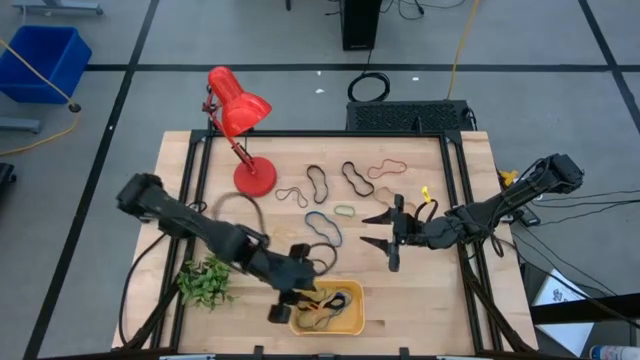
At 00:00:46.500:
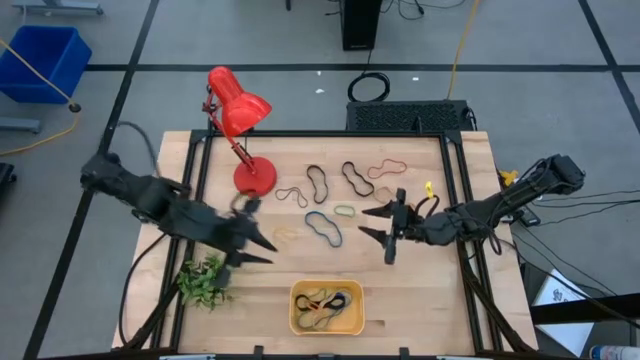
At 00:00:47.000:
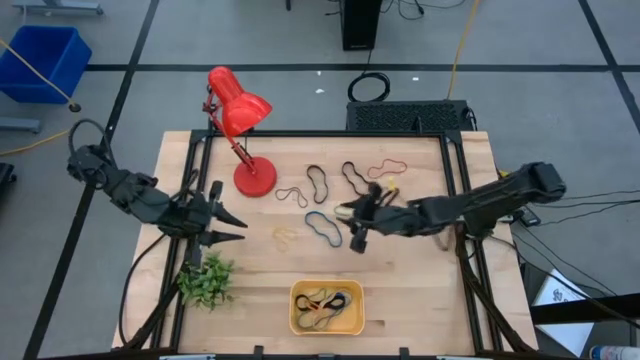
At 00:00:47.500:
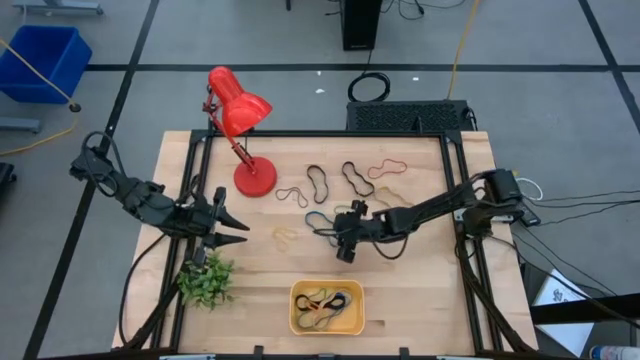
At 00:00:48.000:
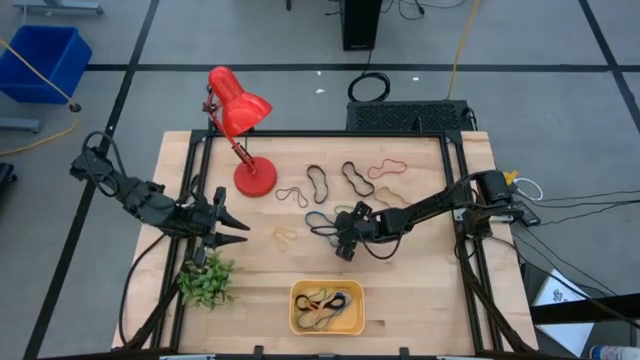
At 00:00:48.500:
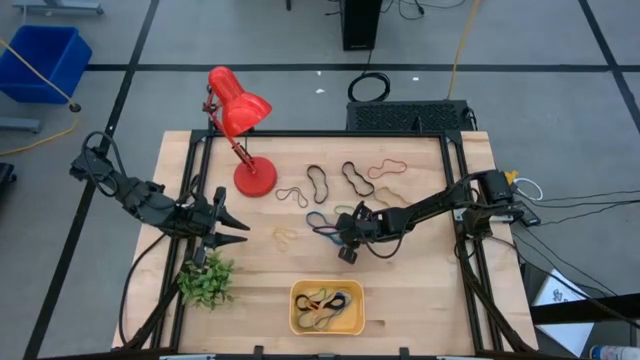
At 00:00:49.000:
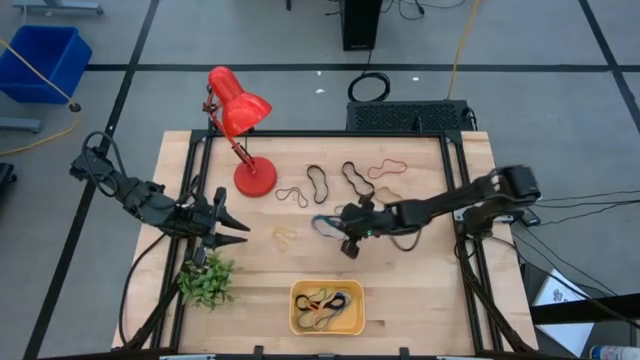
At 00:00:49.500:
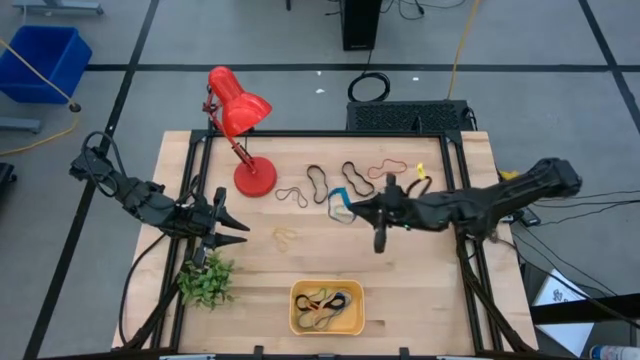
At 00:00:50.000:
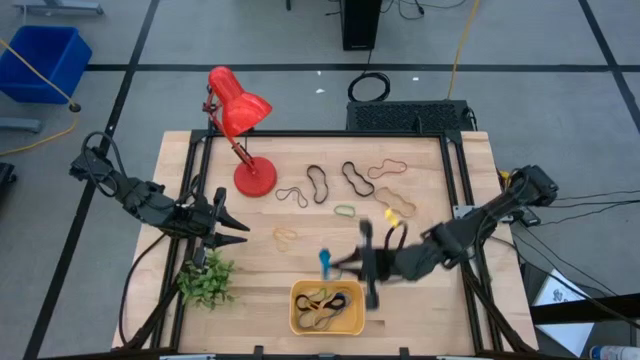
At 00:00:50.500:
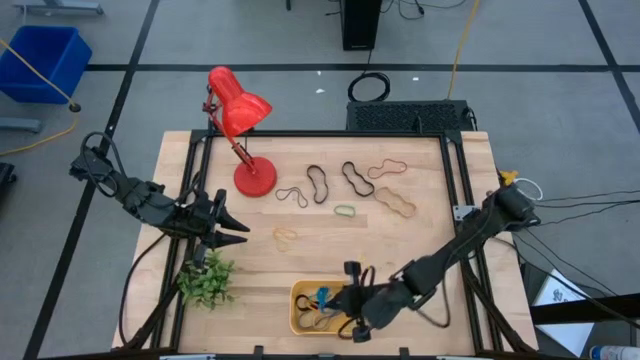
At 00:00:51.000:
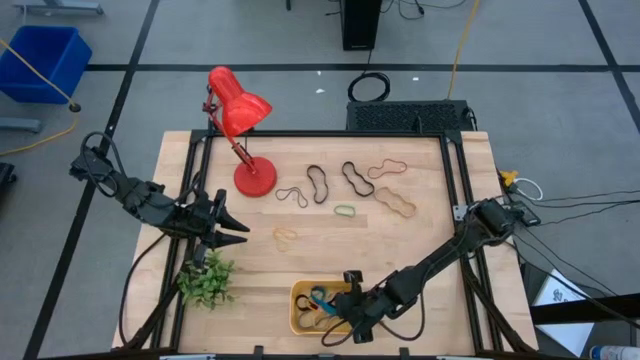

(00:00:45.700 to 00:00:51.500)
Task: Pick and place rubber bands into bin
Put the blue rubber band into the bin

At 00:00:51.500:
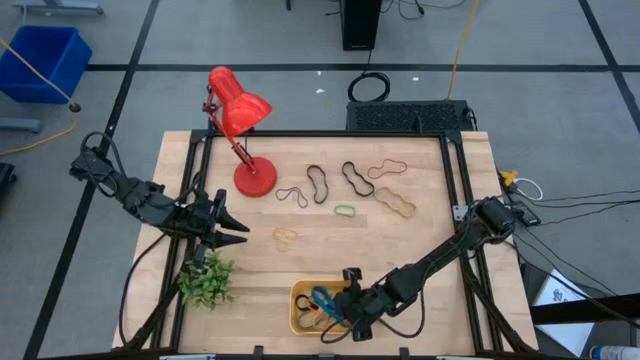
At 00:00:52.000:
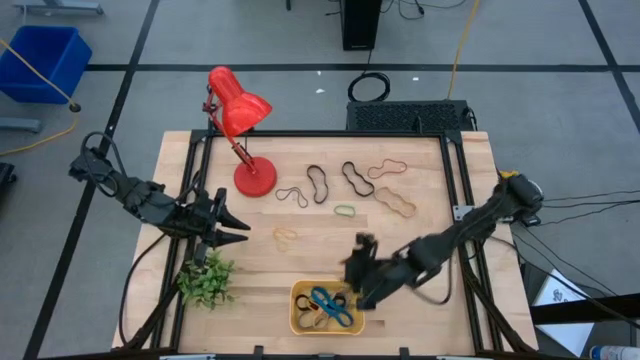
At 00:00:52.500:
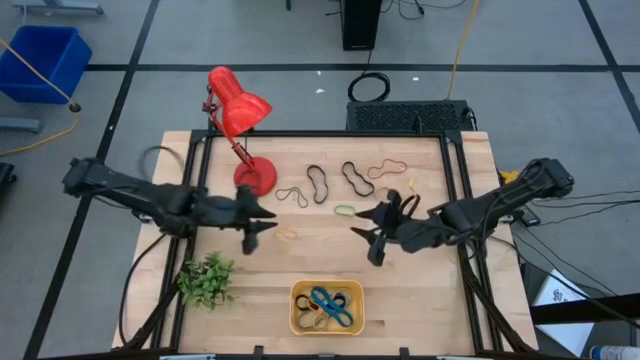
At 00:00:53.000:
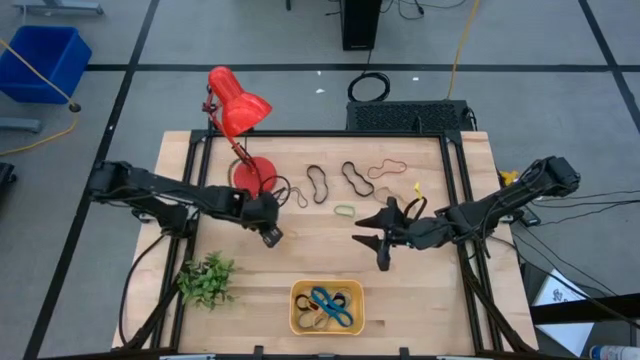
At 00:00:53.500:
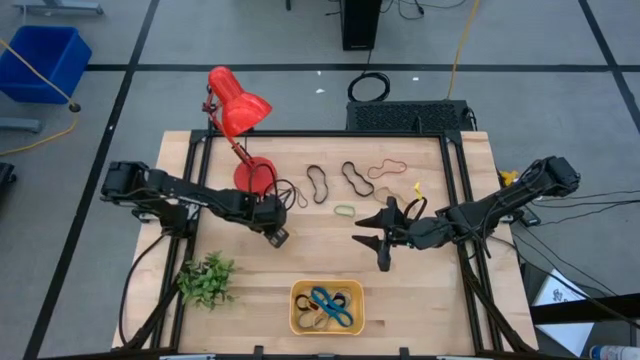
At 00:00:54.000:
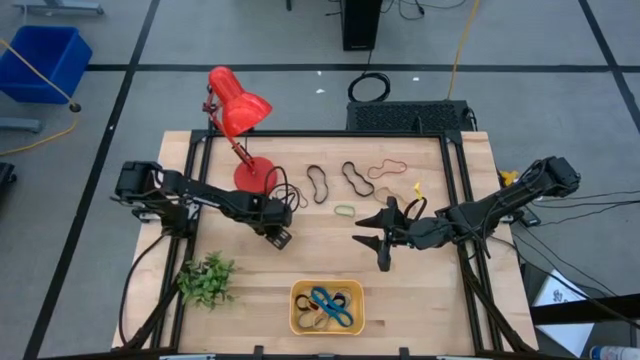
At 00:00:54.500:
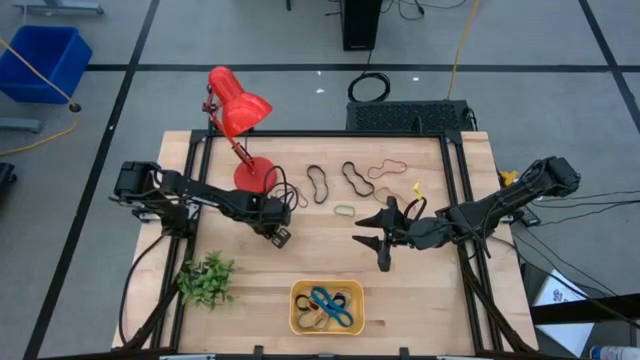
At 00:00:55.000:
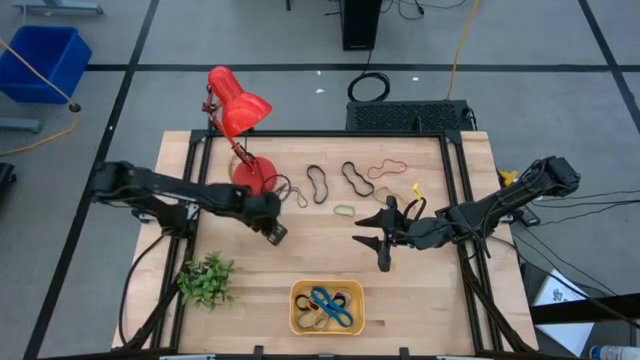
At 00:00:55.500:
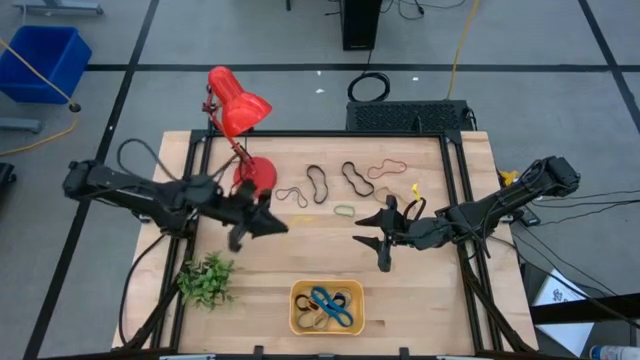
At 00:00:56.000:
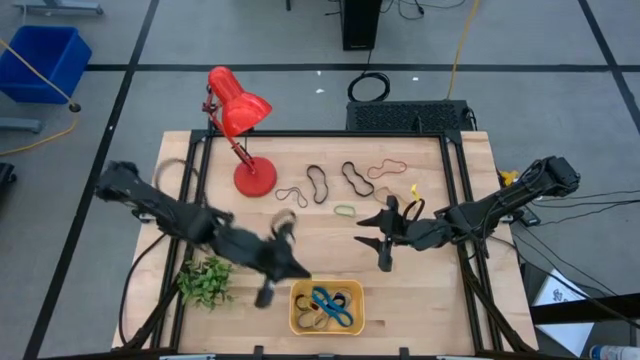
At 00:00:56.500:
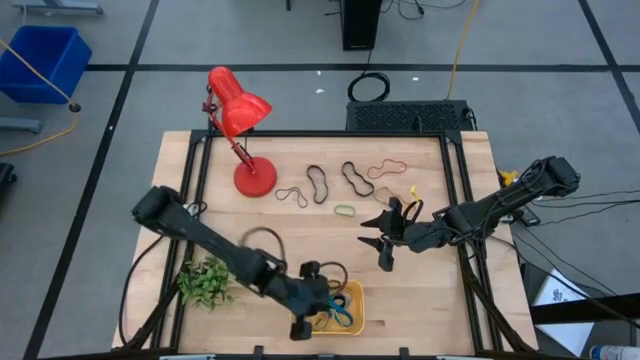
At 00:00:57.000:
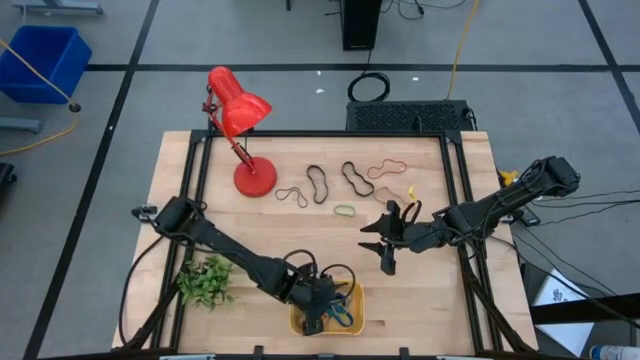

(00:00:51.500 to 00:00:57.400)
Put the yellow rubber band into the bin

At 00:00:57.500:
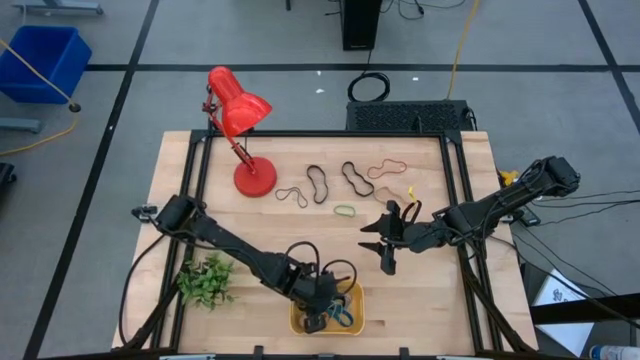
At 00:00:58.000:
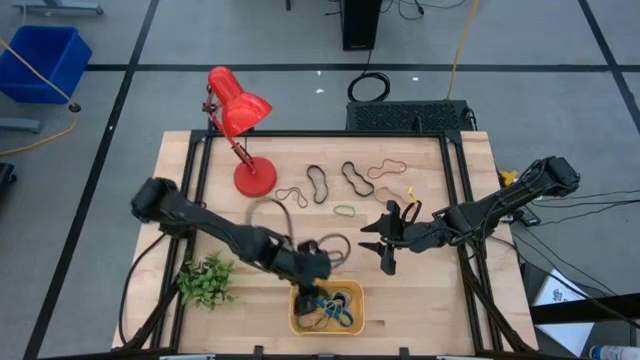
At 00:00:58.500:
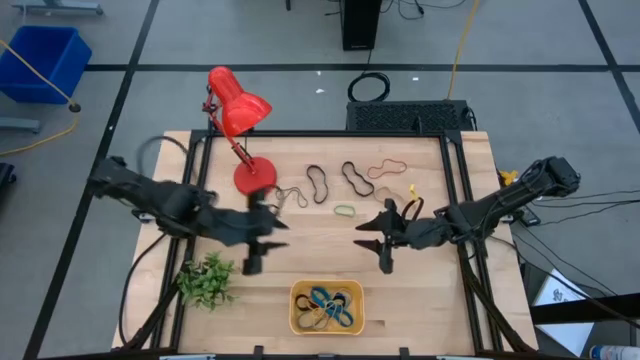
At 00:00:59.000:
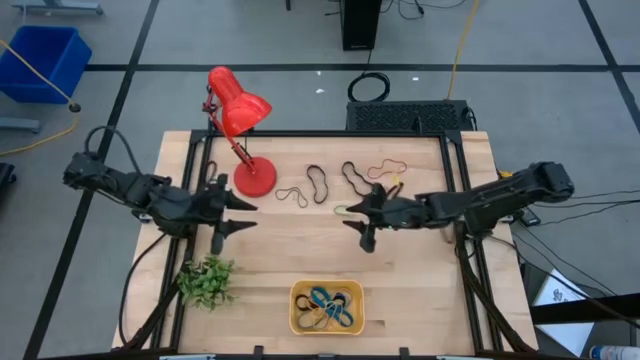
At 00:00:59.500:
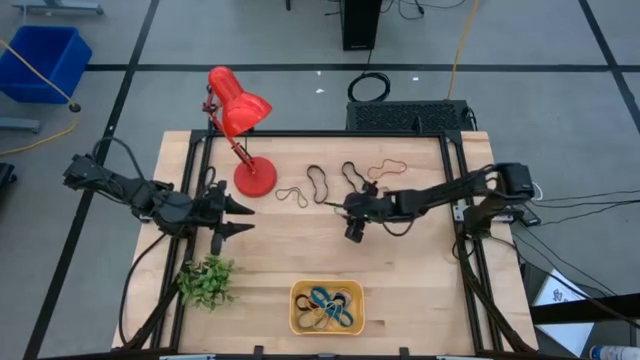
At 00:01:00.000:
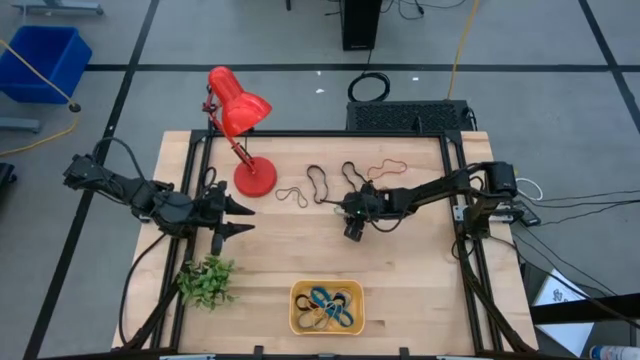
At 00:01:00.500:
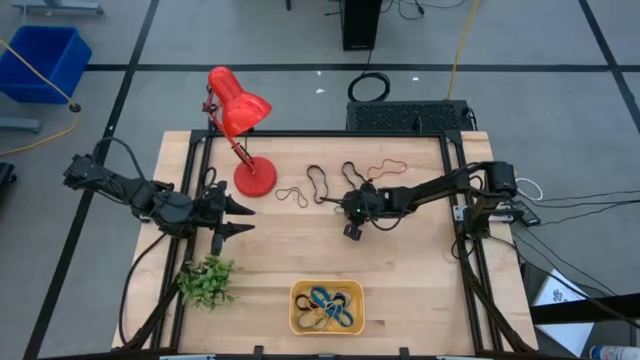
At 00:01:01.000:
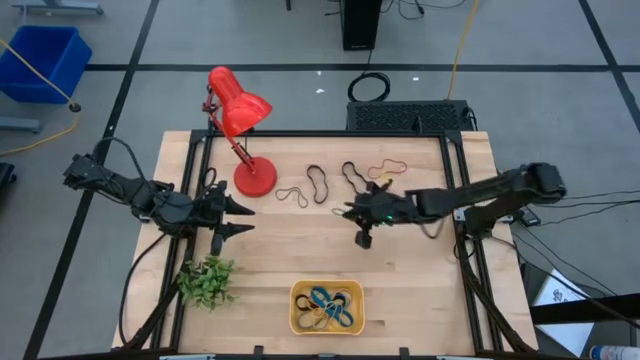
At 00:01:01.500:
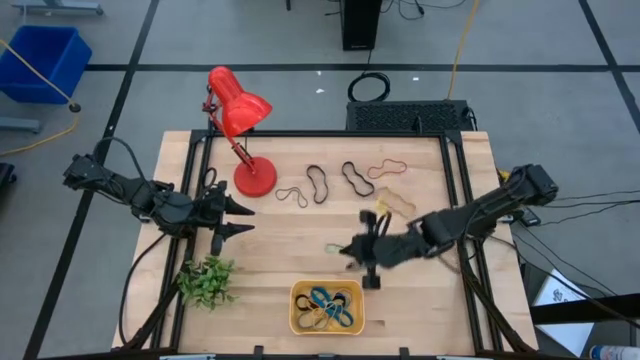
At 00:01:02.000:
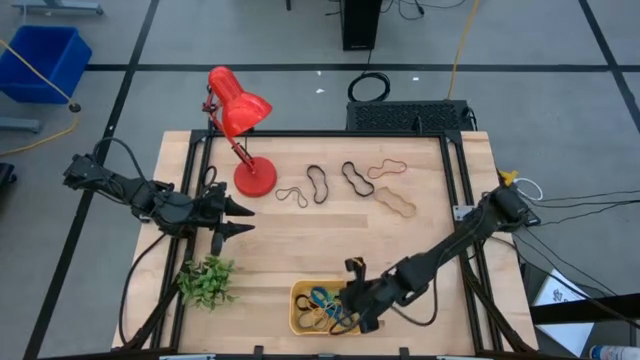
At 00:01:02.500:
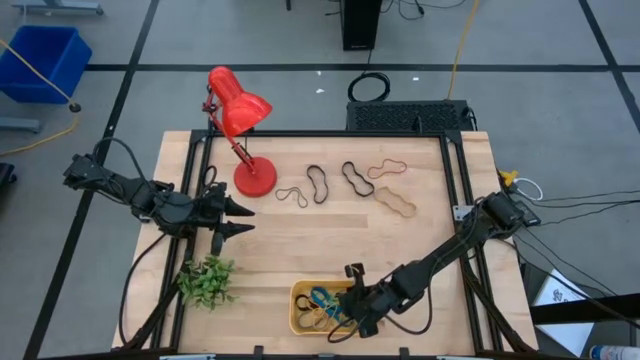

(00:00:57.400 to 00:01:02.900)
Put the green rubber band into the bin

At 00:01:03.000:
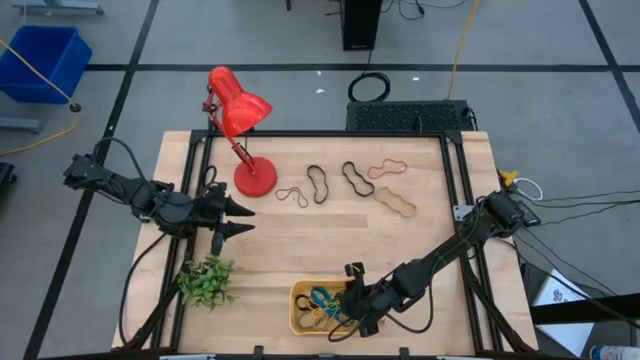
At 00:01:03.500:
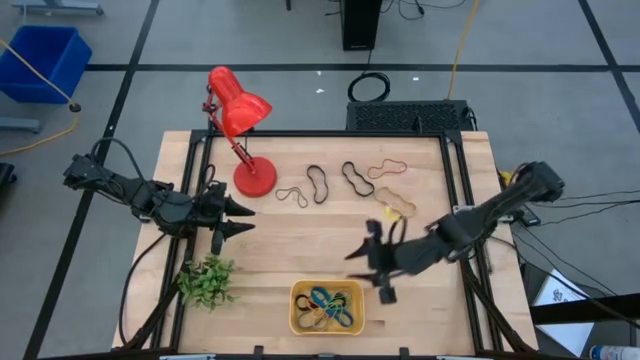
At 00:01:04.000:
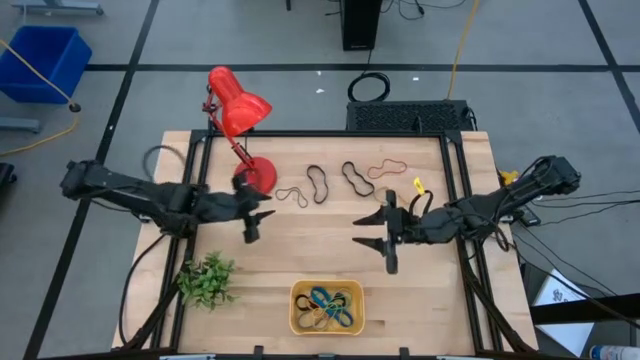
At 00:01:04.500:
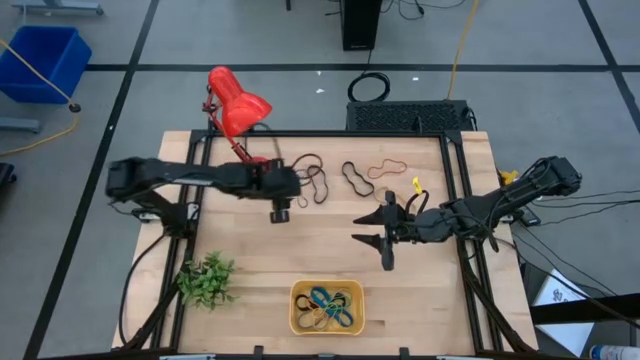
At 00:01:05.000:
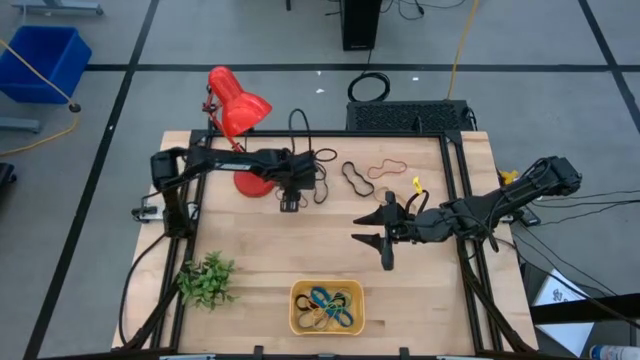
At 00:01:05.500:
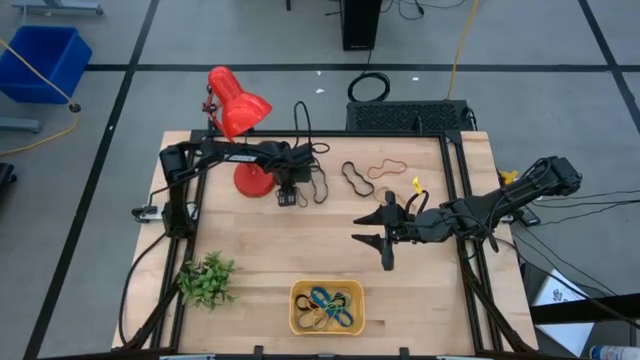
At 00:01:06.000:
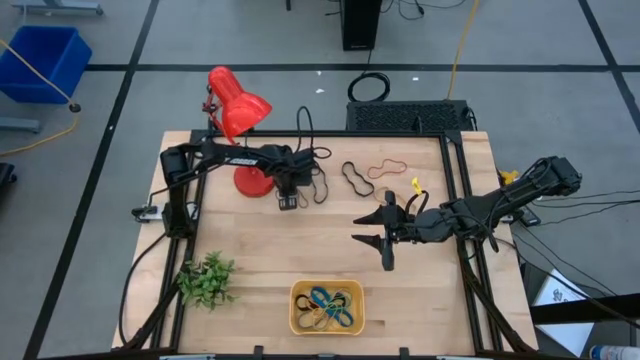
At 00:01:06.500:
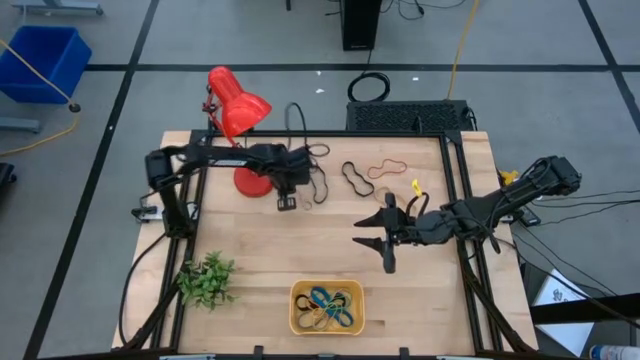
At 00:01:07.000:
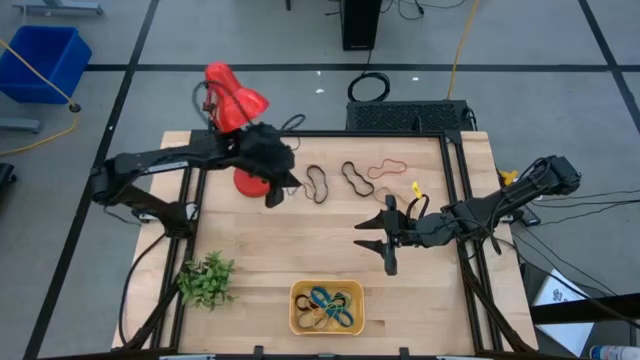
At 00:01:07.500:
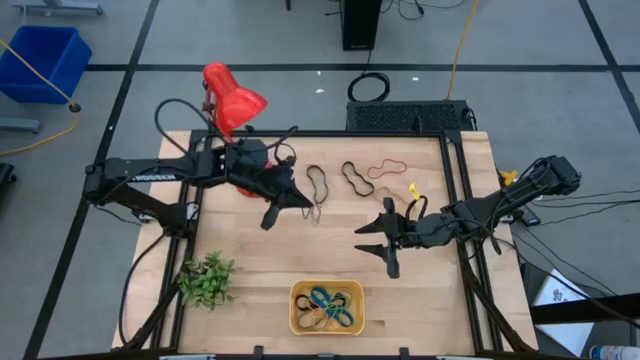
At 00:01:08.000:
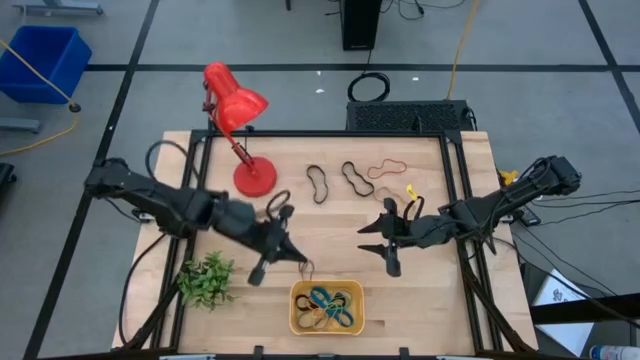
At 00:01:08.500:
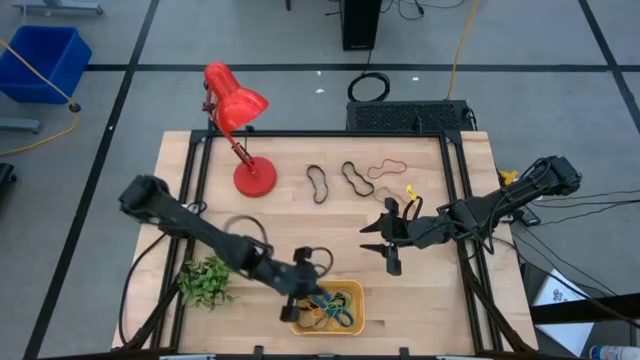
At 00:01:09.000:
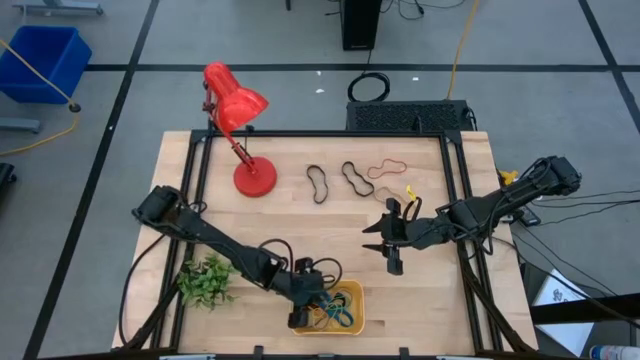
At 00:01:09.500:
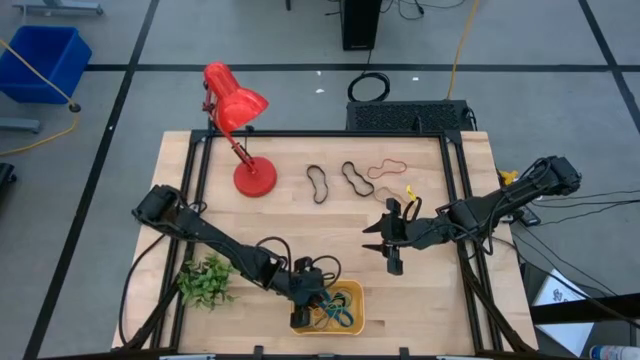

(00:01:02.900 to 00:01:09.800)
Put the purple rubber band into the bin
